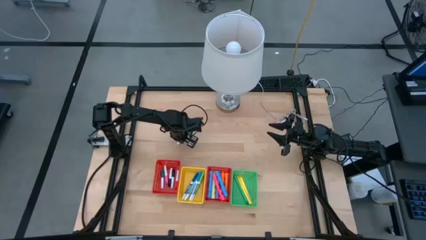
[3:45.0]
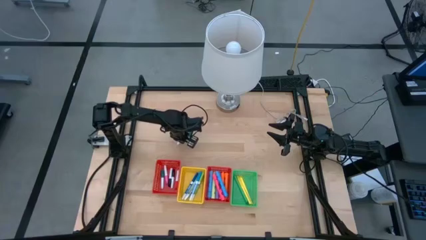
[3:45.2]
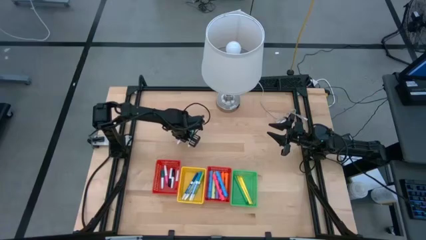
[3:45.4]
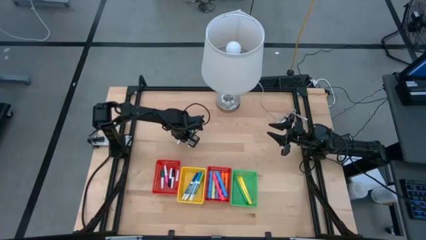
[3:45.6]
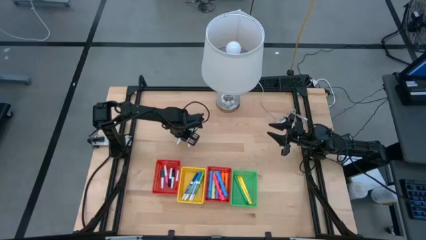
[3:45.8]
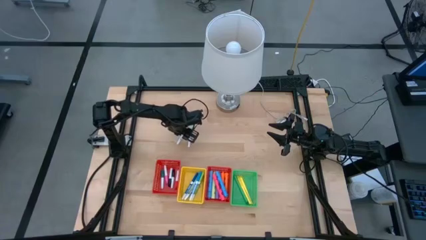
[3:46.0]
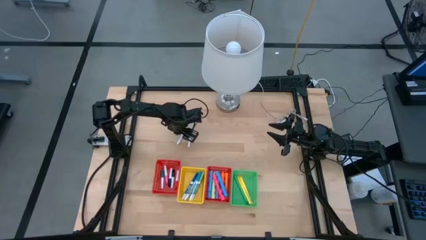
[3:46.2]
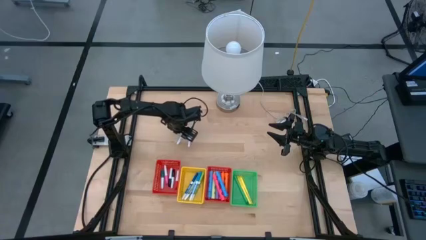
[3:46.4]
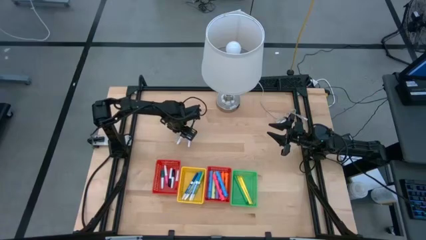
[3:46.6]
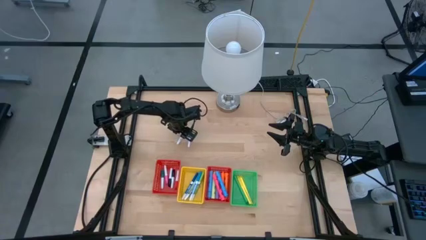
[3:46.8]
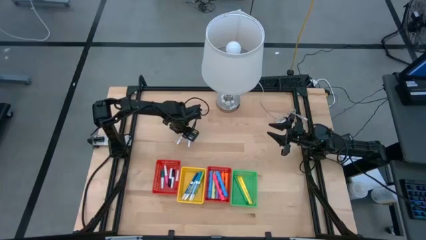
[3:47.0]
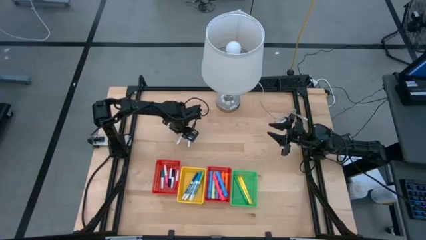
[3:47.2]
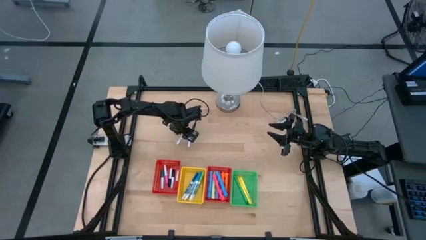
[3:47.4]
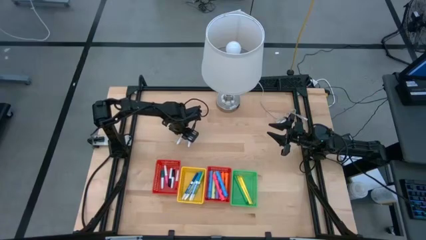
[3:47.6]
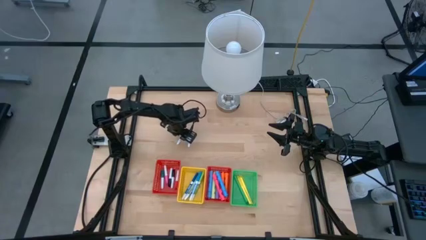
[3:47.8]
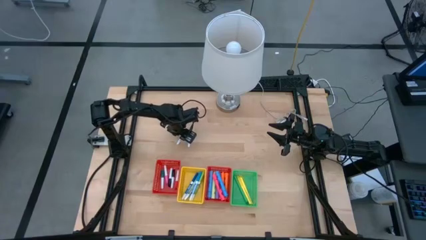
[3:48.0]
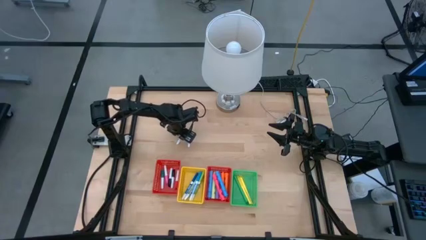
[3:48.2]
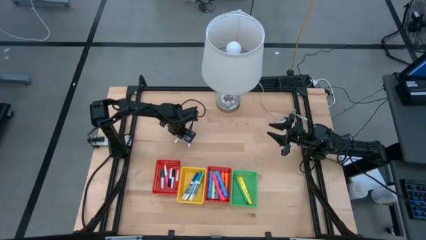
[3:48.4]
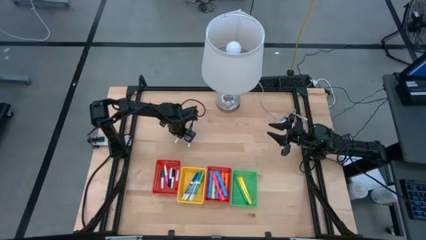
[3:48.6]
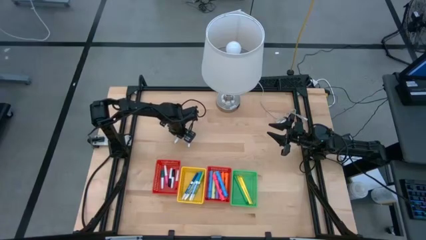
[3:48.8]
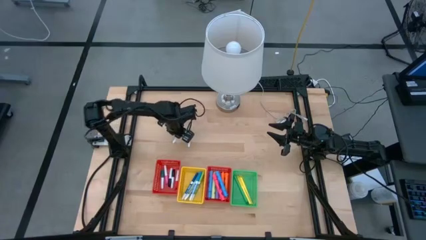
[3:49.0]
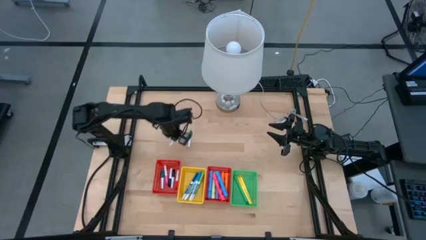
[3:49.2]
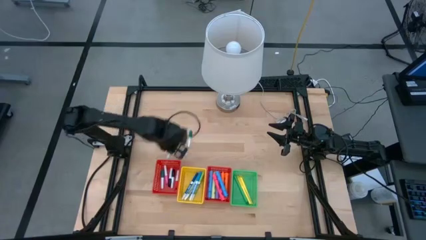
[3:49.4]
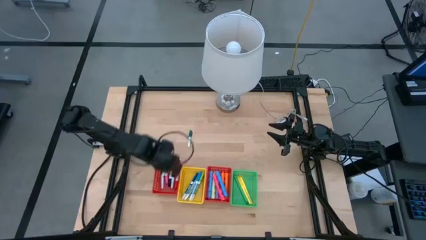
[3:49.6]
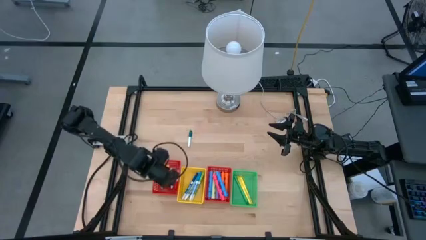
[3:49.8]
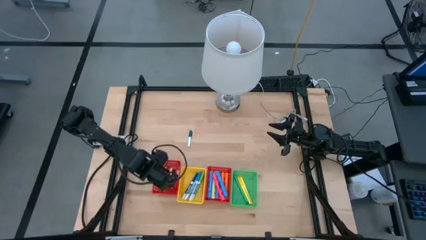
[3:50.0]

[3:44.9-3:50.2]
Task: Pick & Place Markers
Put the small yellow highlighter into the left red bin

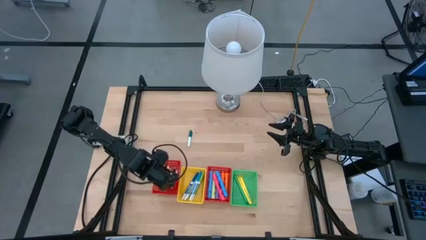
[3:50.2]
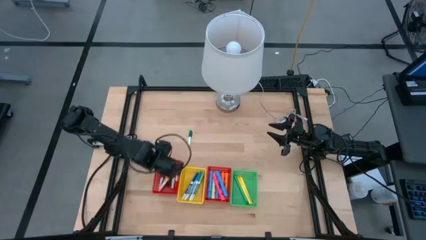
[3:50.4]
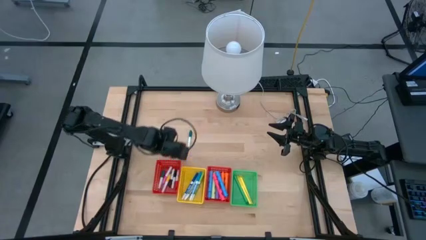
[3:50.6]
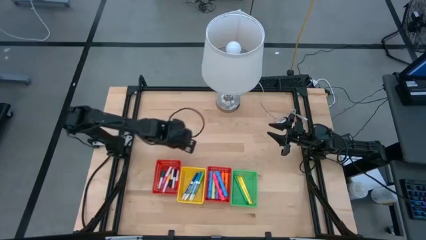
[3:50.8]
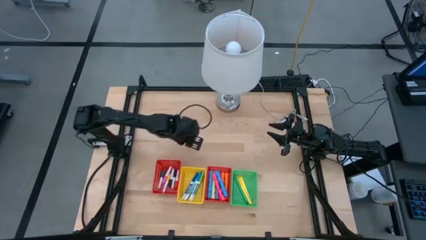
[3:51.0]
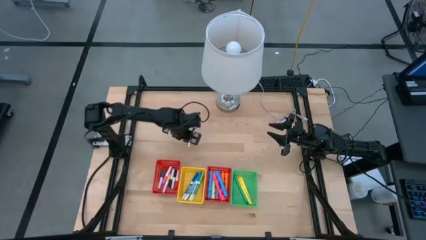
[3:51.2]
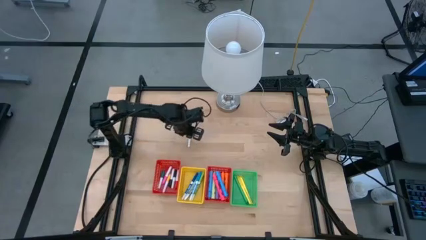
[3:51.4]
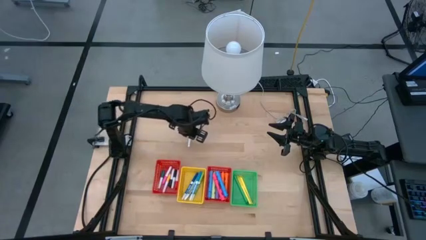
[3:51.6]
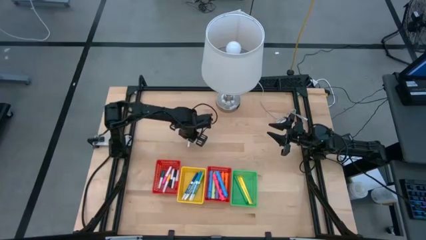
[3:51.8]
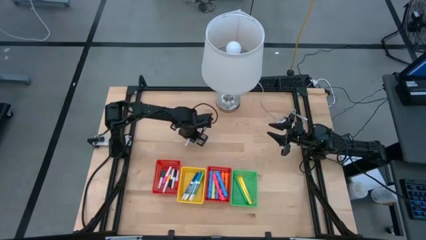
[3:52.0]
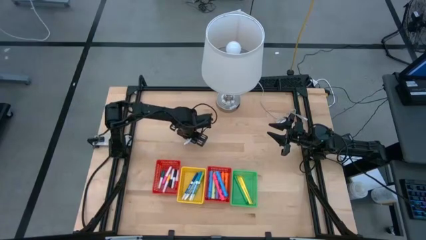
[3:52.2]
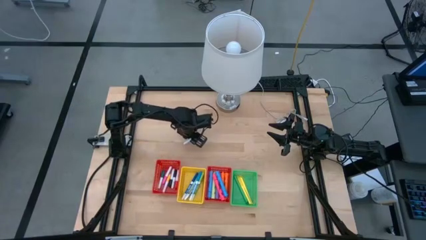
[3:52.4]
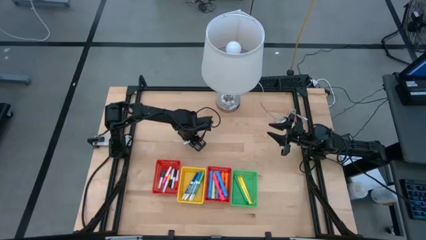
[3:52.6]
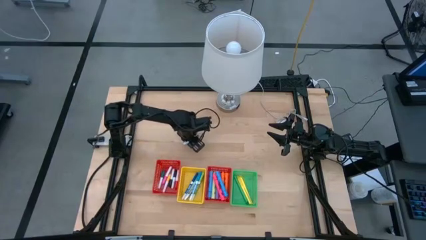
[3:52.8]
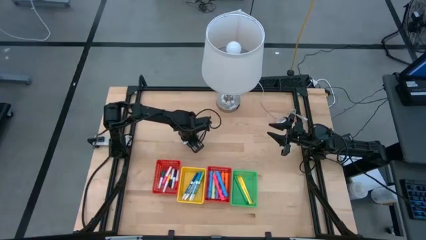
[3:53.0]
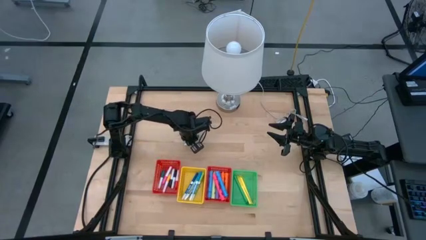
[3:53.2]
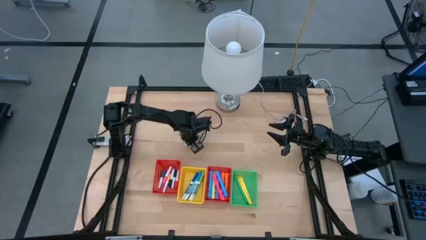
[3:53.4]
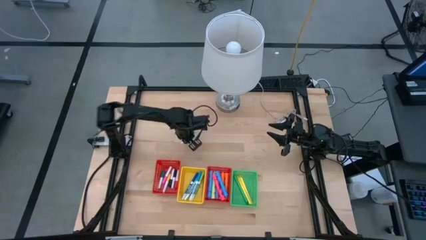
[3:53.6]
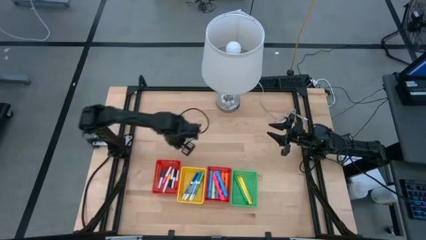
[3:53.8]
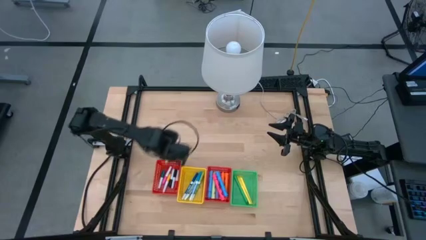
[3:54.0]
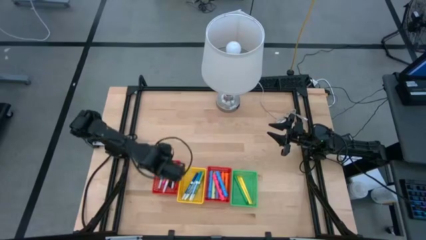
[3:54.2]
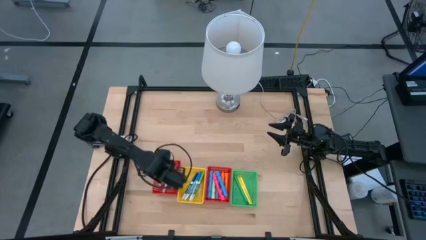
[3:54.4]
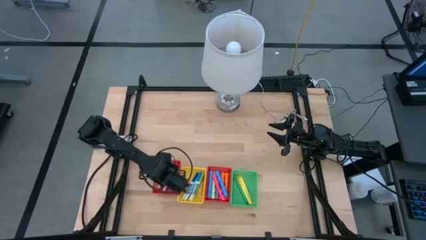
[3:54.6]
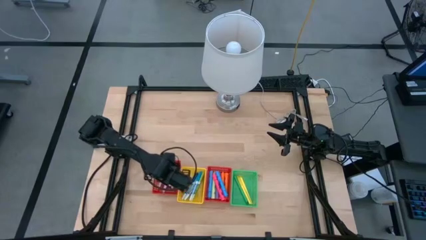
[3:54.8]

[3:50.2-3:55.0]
Put the small green highlighter into the left red bin

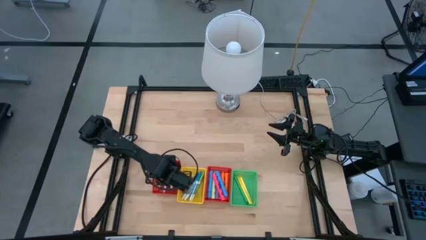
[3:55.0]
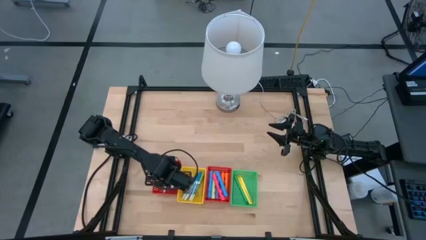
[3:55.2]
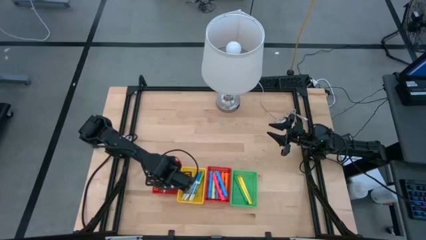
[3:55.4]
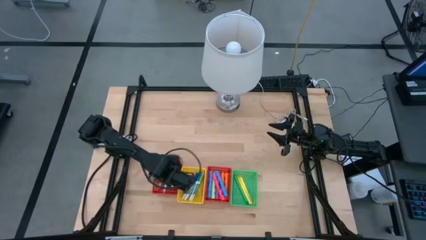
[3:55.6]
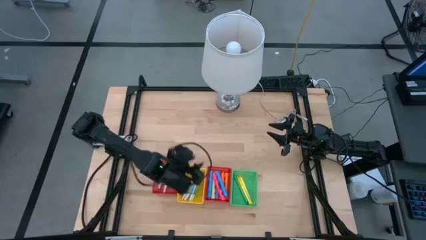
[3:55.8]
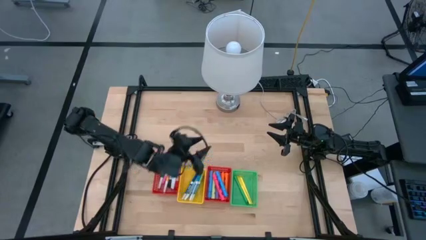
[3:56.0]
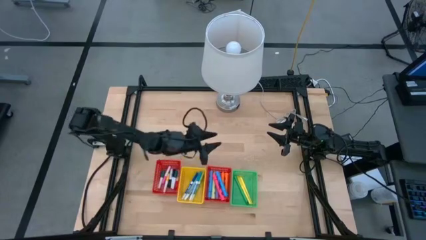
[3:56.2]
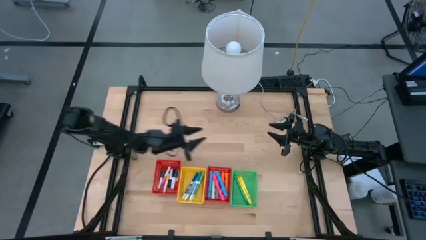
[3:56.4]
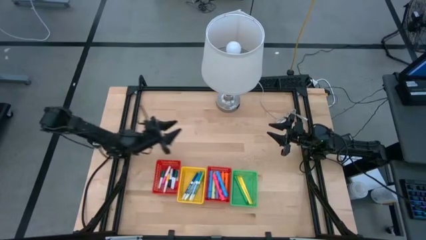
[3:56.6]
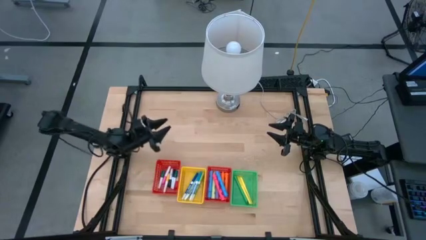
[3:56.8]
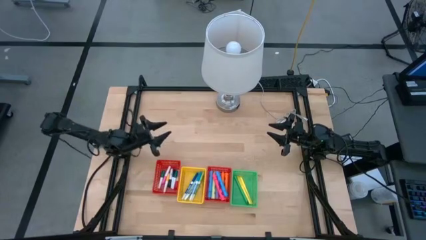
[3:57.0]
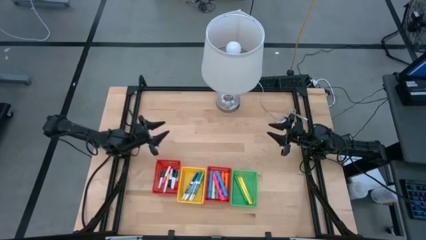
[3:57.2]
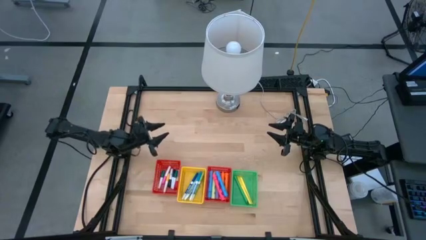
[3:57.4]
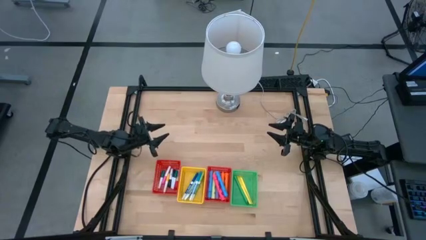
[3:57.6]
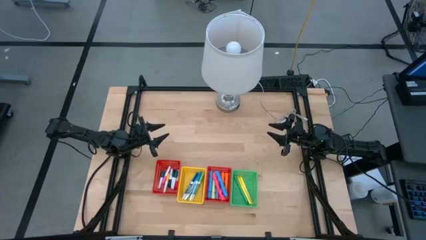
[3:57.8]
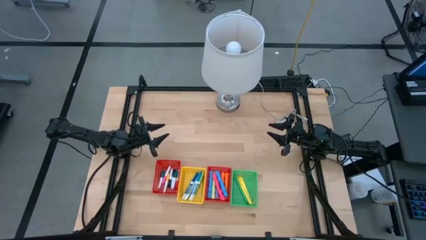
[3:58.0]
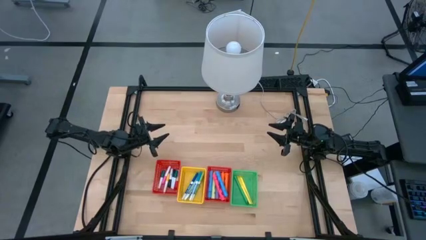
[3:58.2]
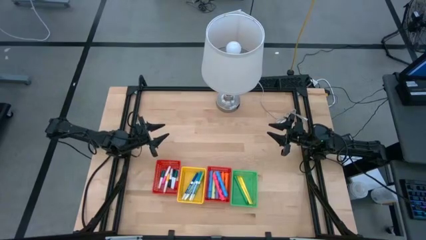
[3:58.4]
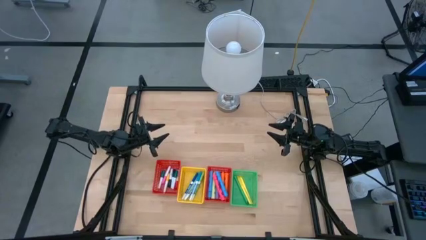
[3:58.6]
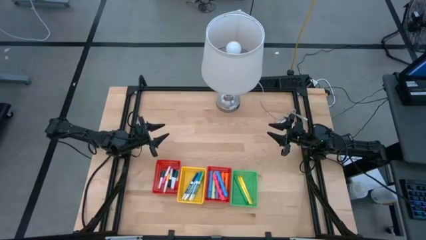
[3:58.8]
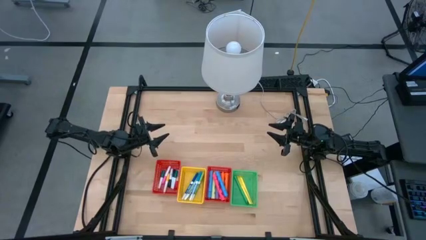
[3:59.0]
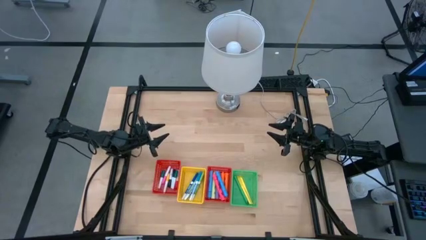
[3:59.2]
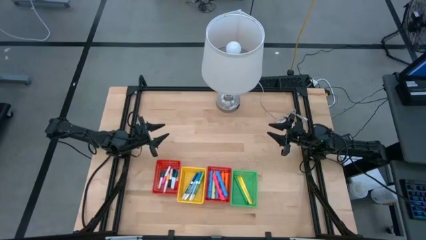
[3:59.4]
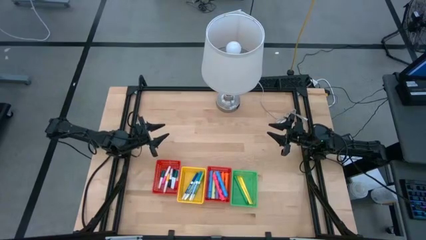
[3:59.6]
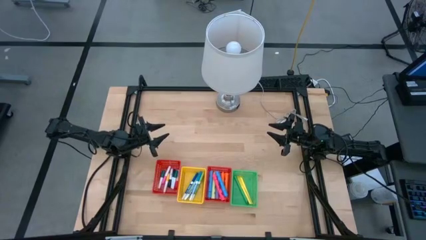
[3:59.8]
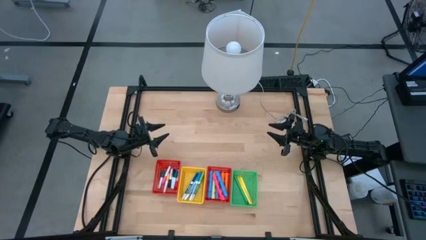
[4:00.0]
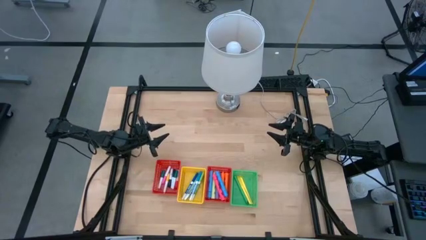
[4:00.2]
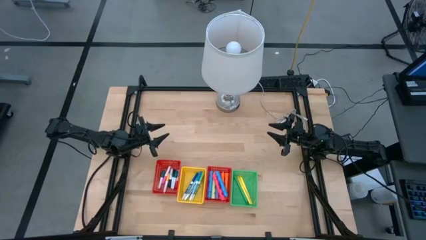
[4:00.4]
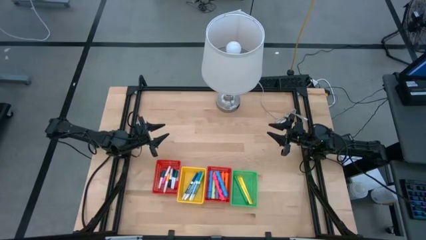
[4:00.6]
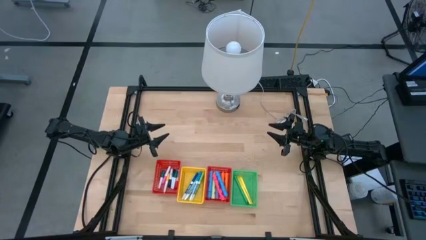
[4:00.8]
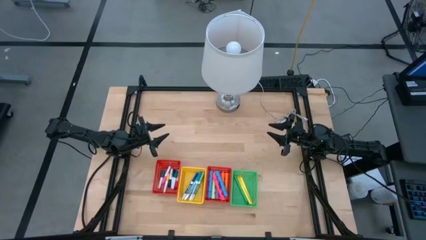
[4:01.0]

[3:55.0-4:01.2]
Return to Home Position
